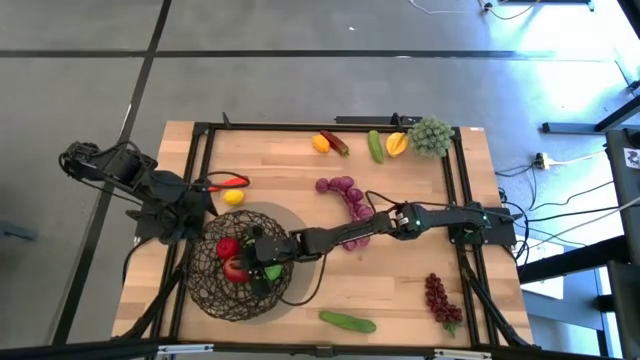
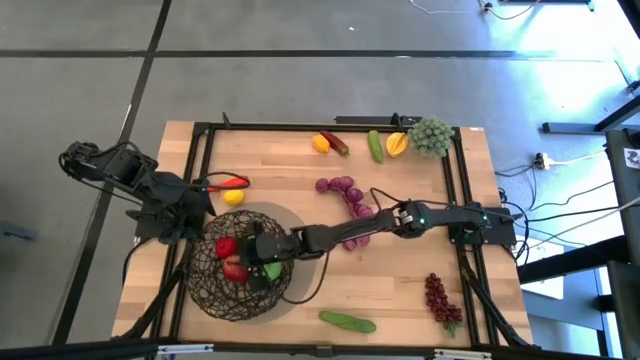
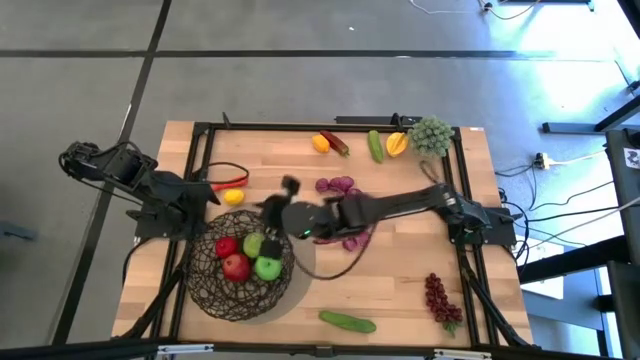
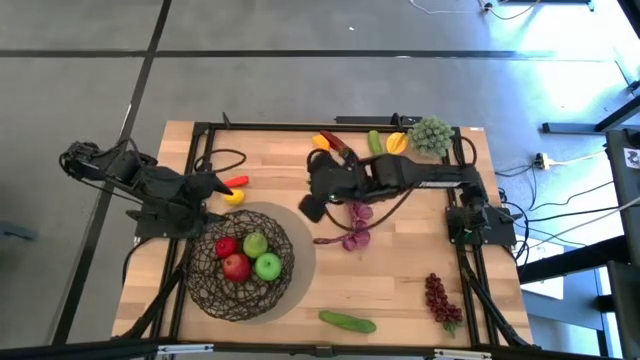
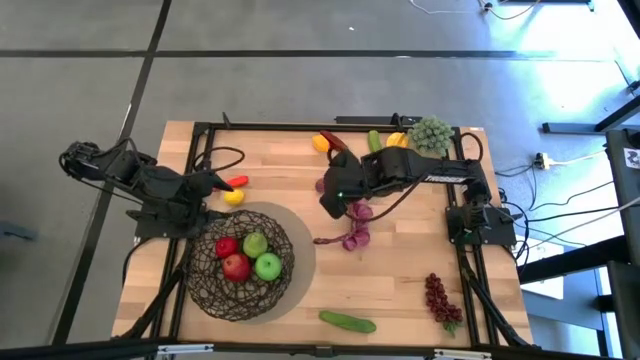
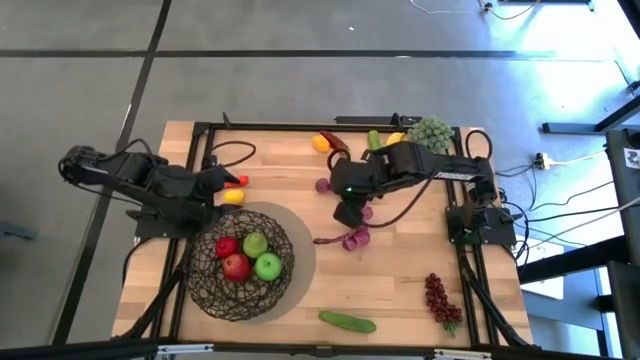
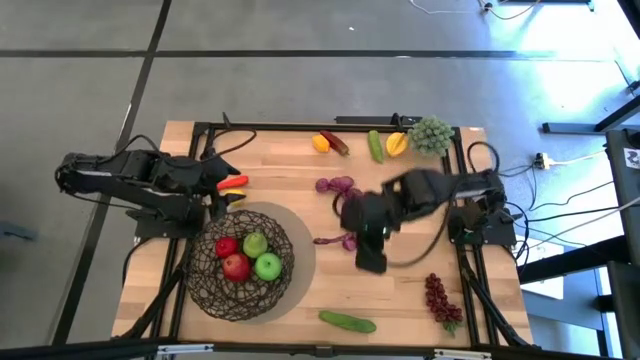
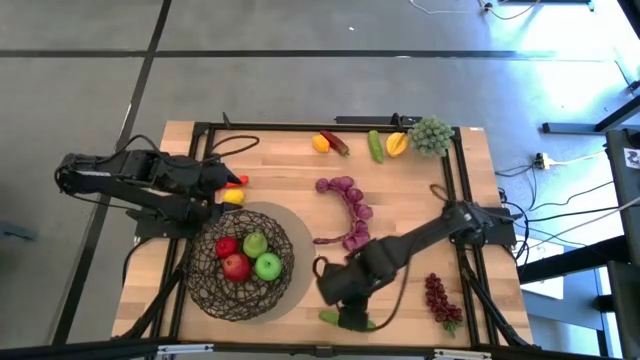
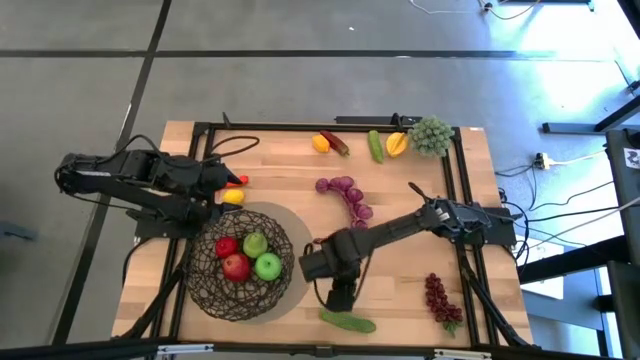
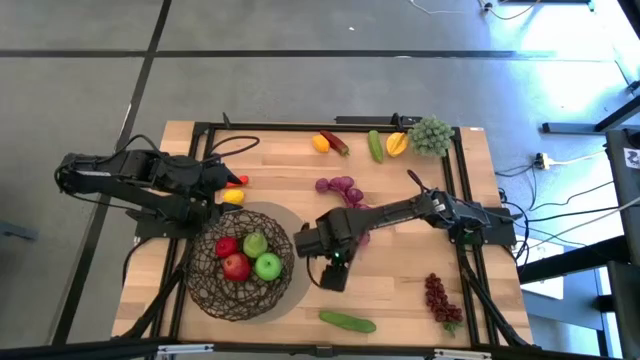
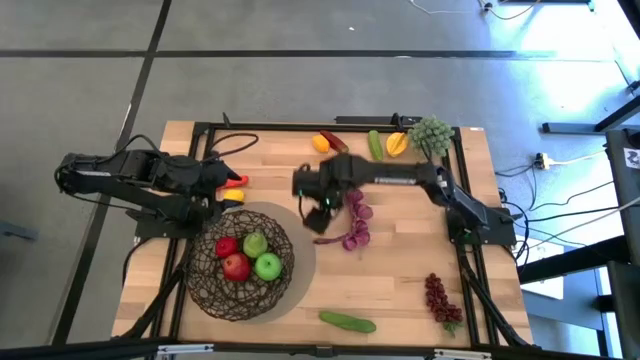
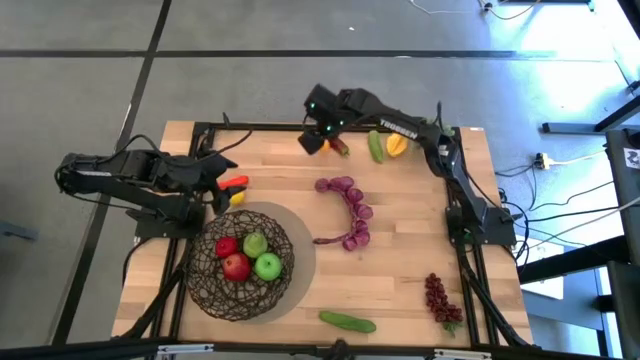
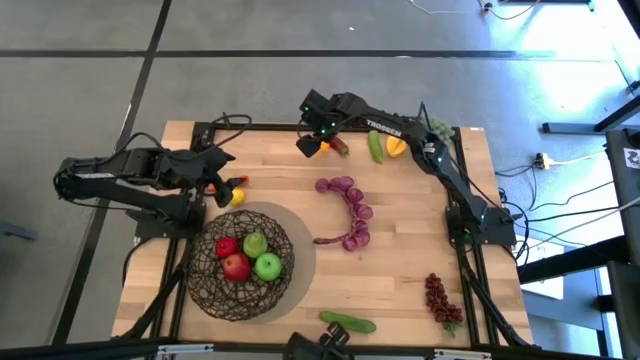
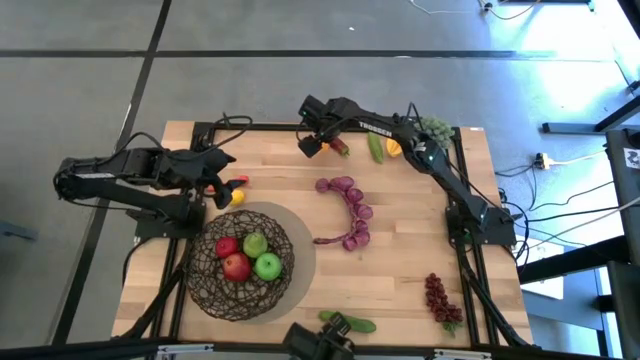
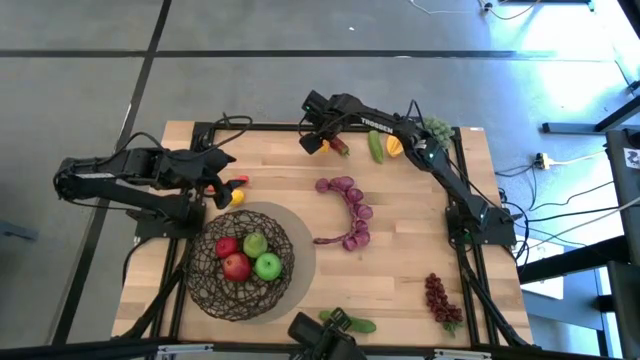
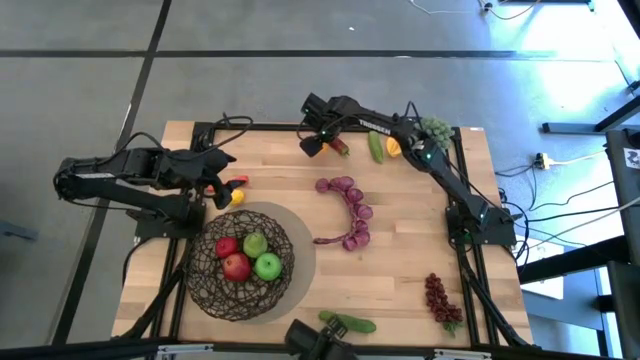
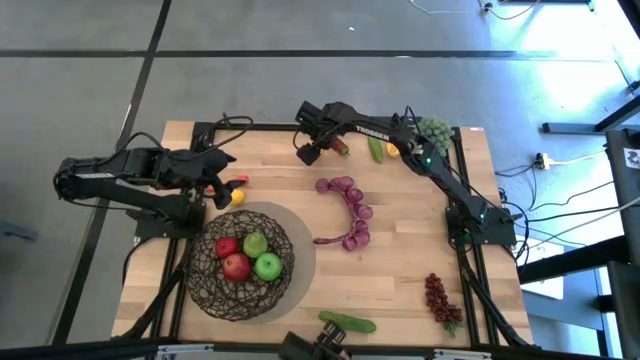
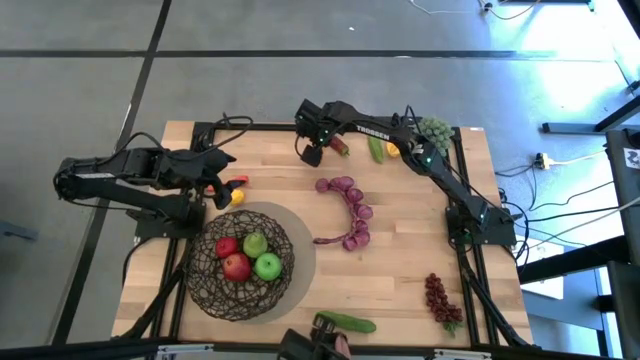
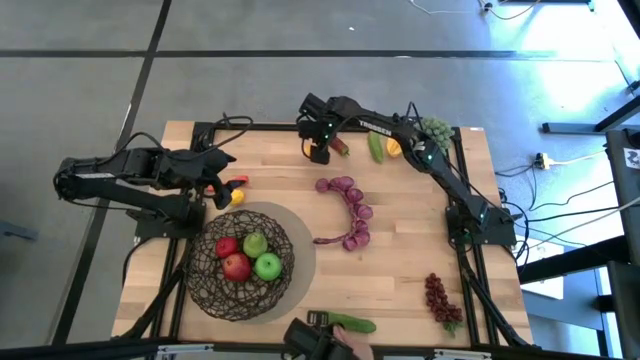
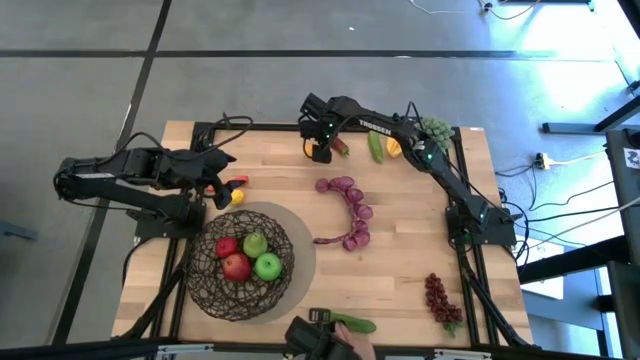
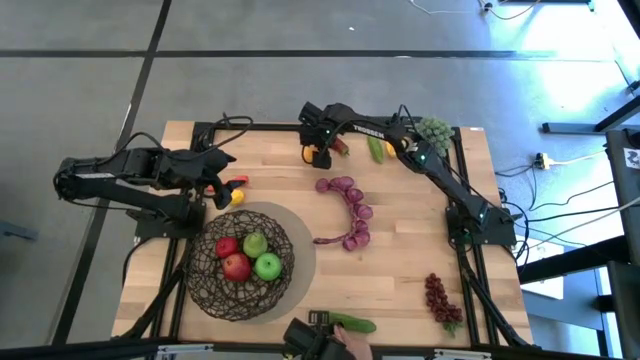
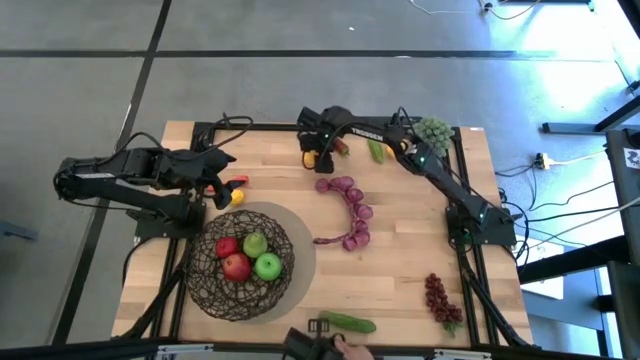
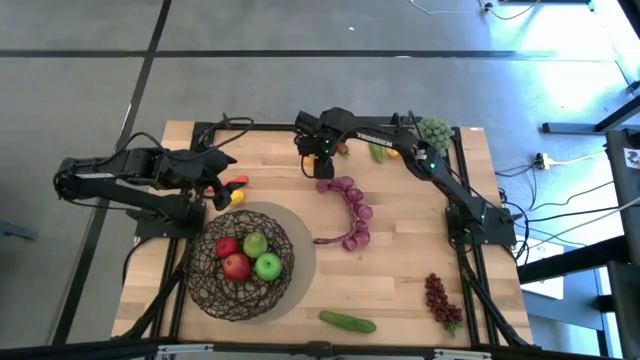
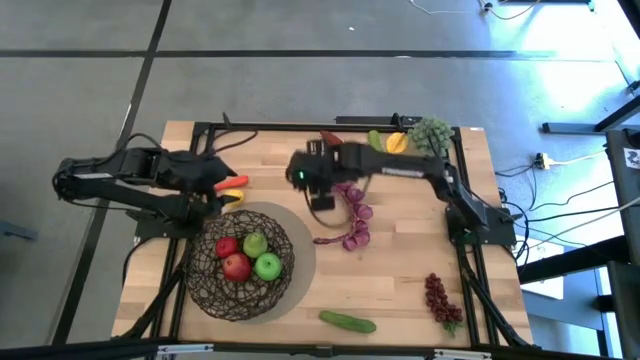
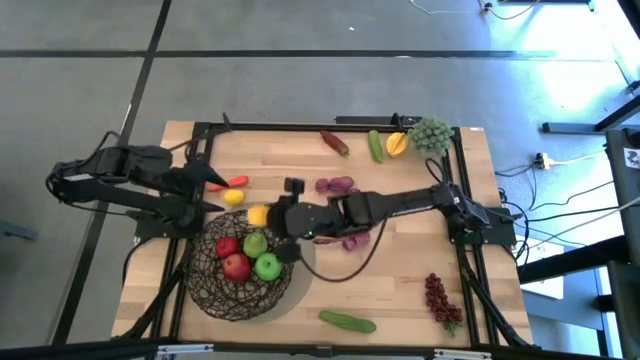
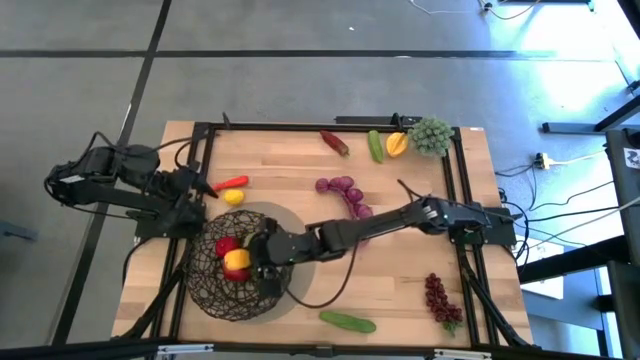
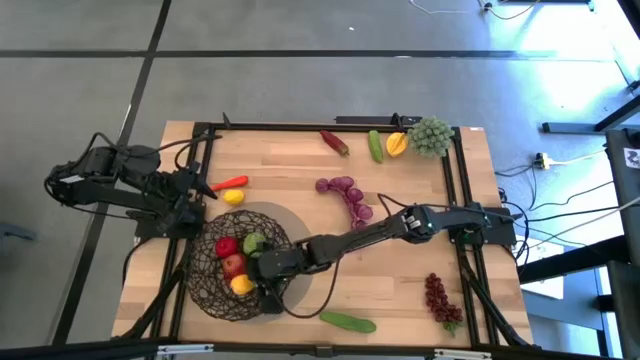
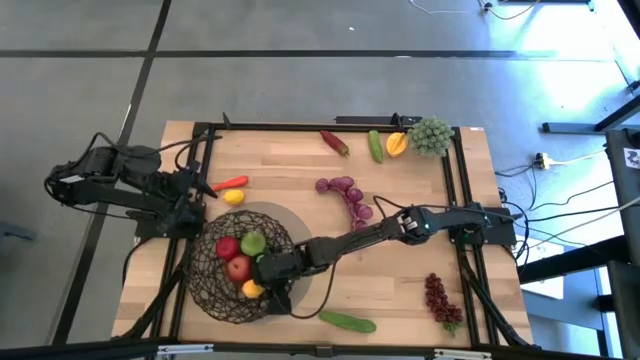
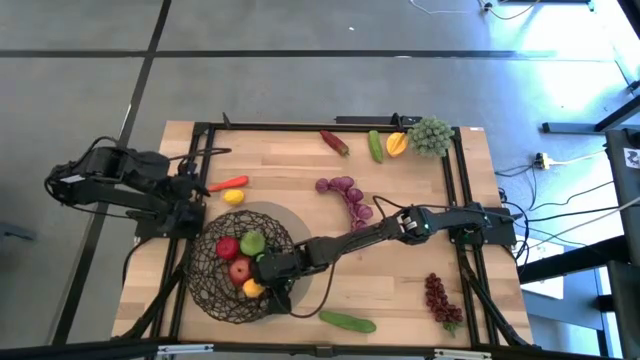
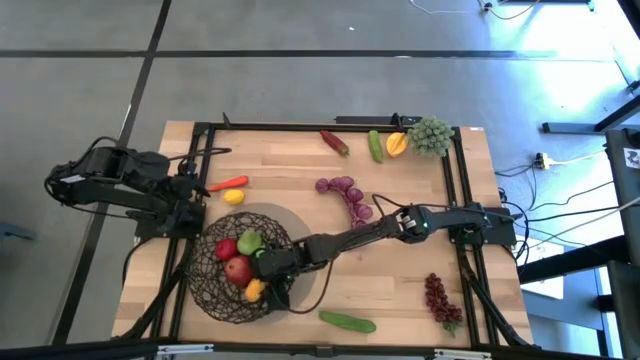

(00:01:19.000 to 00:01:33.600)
Task: Build produce basket
Put the top yellow lemon into the black wire basket
